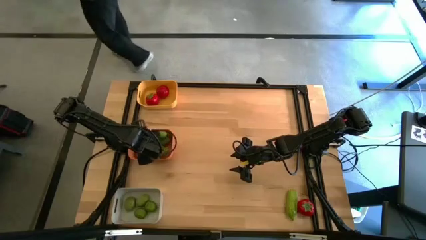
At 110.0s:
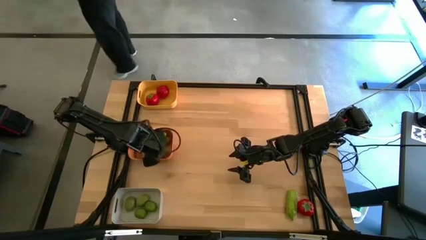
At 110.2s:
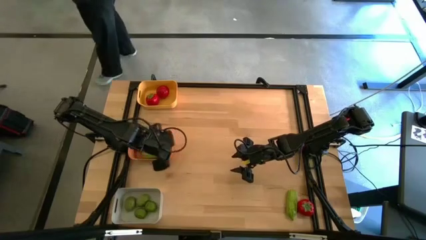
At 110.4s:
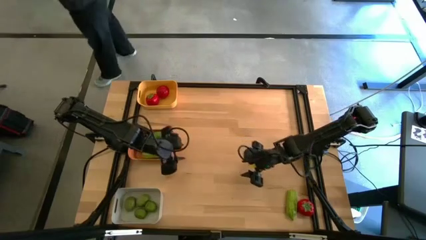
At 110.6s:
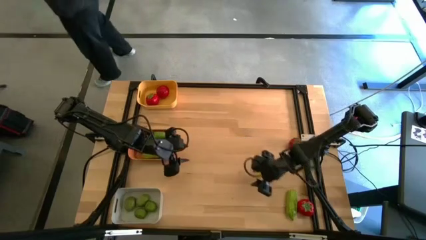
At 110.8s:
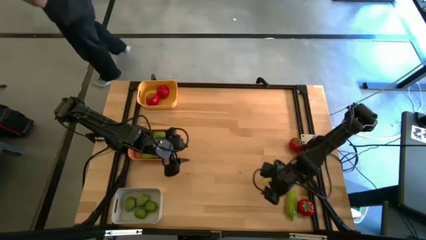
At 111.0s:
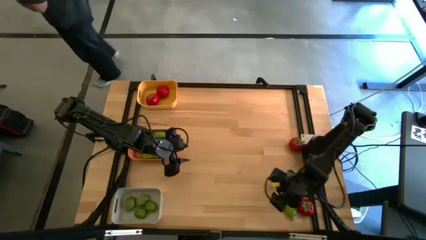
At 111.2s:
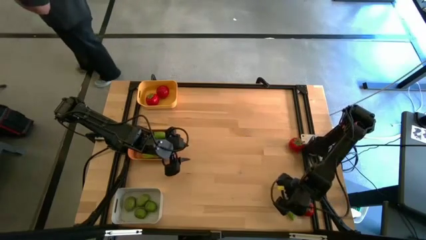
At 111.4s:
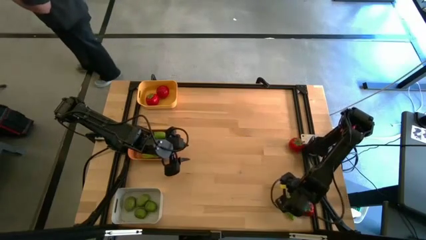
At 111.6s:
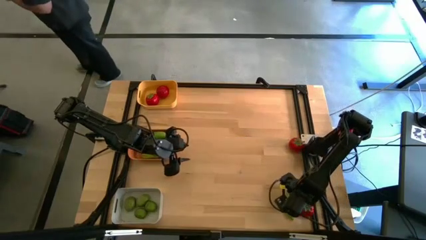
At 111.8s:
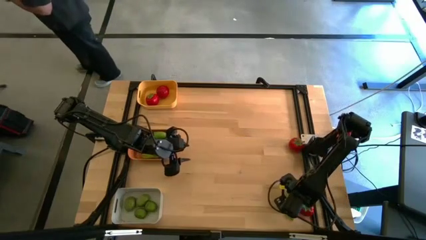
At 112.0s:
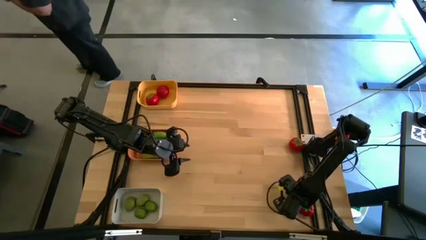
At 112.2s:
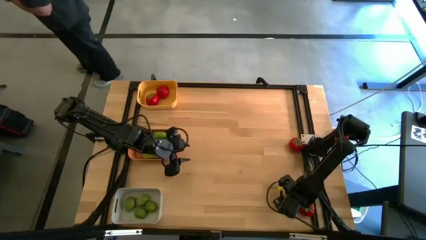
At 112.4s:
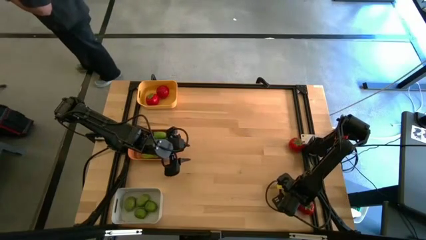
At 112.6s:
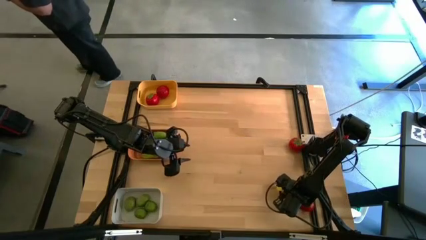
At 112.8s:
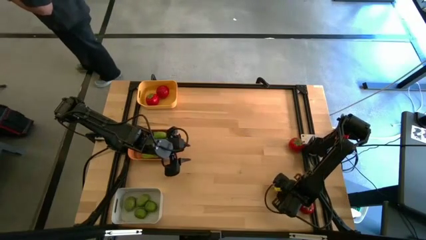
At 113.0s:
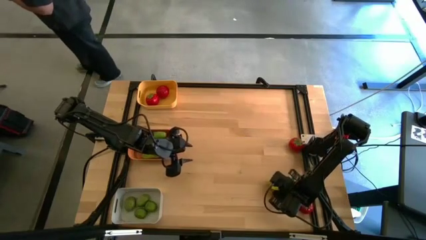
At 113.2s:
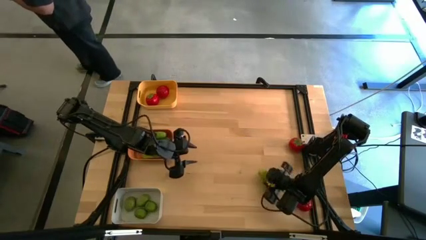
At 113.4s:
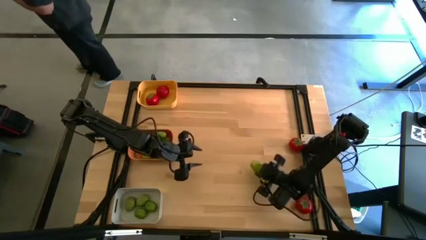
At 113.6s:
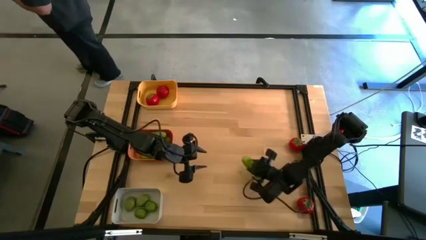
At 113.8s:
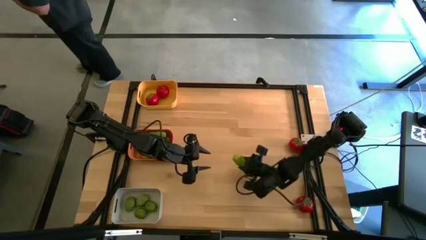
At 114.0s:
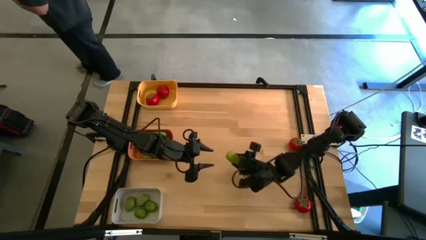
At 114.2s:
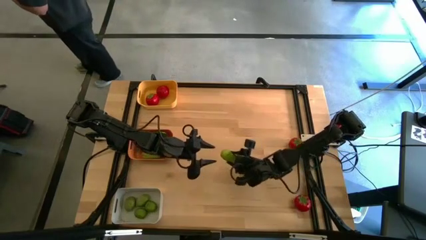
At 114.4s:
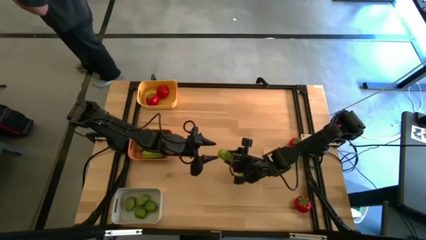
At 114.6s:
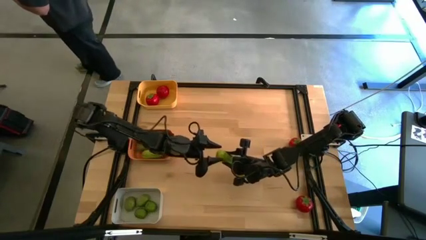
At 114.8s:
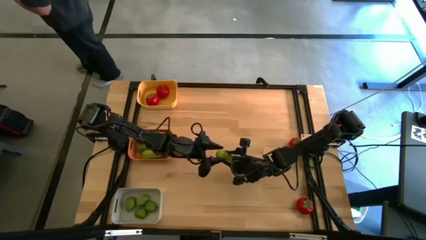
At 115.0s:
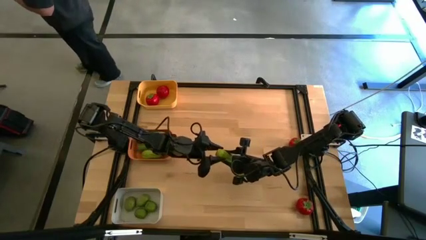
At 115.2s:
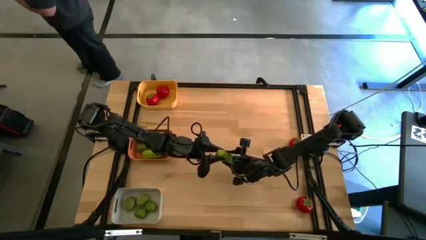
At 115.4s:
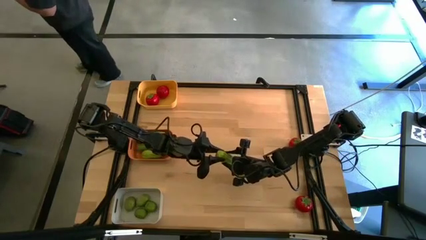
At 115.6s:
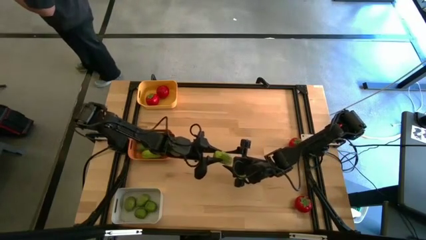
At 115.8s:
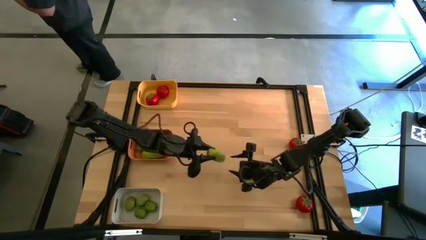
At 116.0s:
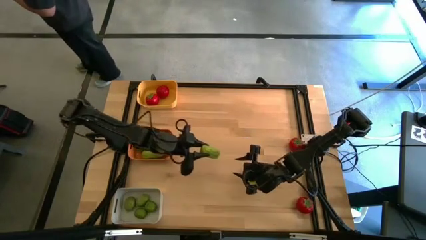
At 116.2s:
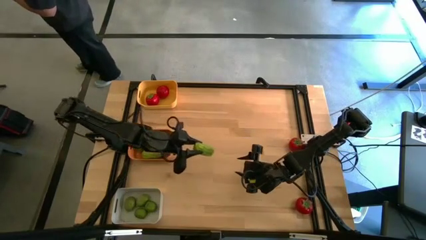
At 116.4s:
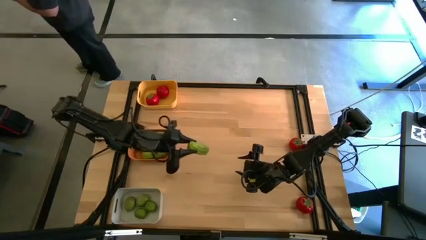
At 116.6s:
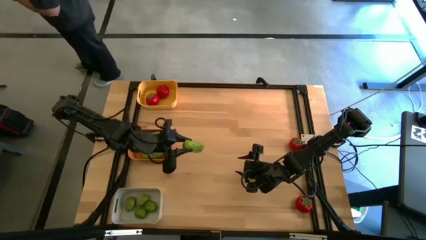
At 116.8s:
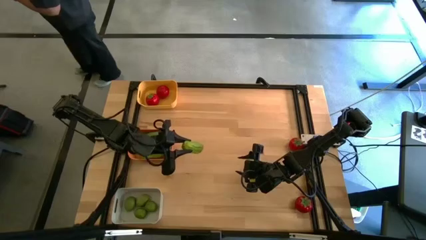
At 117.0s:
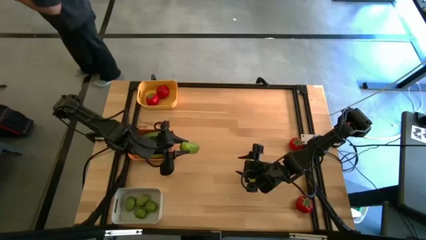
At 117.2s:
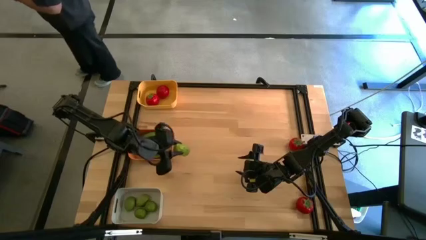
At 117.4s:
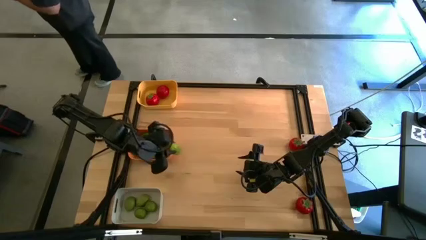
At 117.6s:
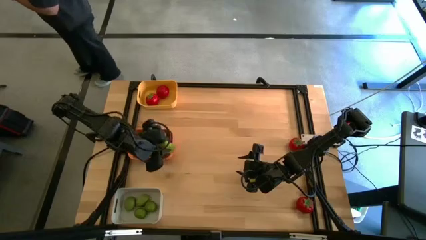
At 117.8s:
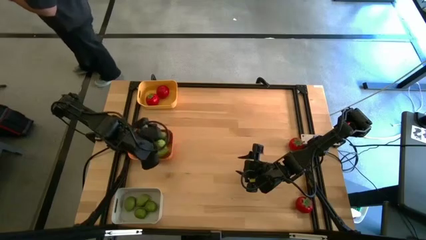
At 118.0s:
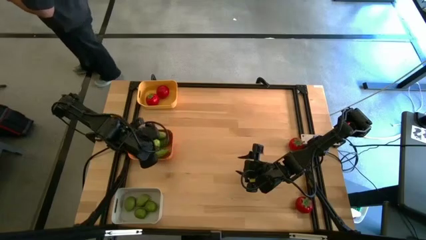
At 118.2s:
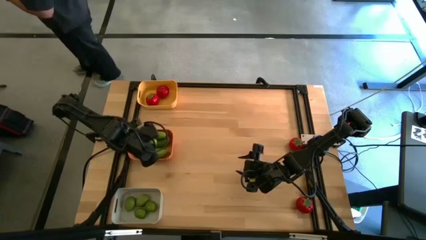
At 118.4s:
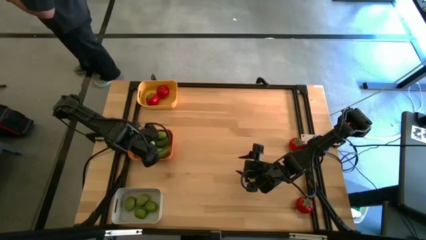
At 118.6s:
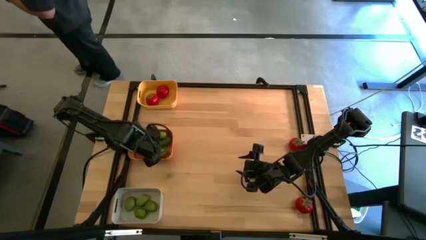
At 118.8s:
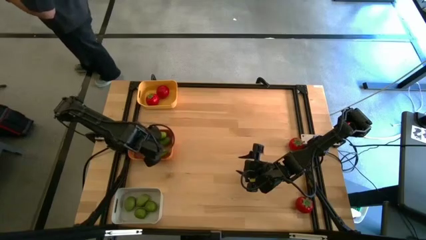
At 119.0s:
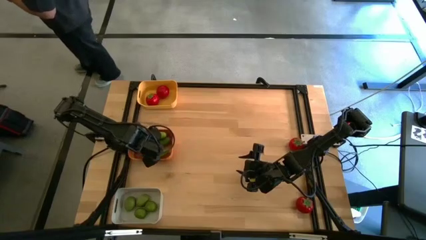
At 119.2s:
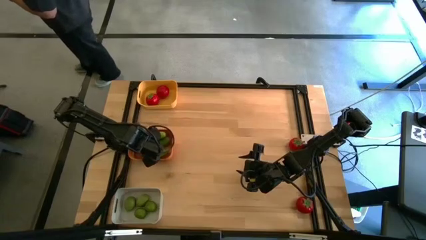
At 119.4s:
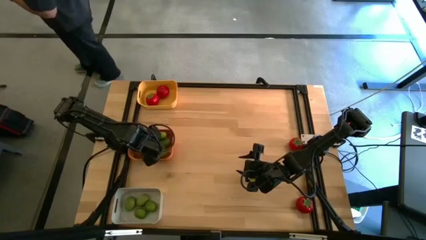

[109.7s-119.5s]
Task: Sort produce into baskets
Put the cucumber into the orange bin

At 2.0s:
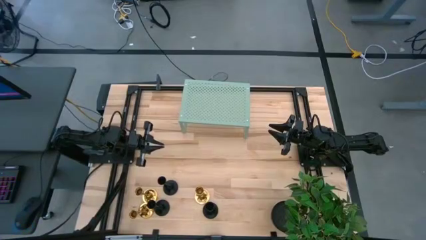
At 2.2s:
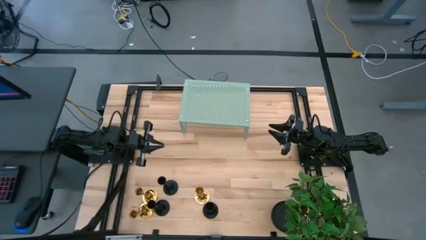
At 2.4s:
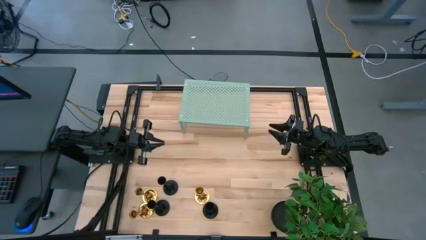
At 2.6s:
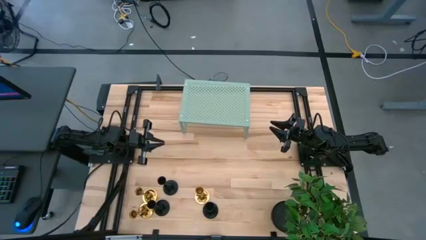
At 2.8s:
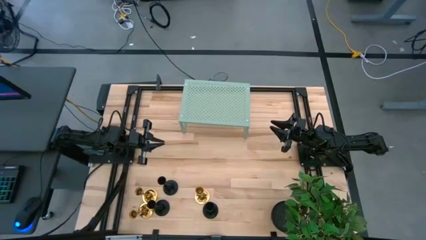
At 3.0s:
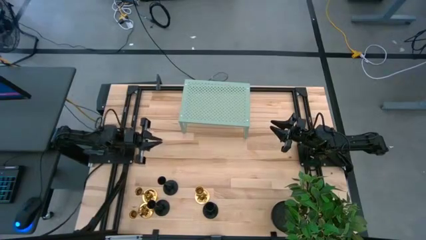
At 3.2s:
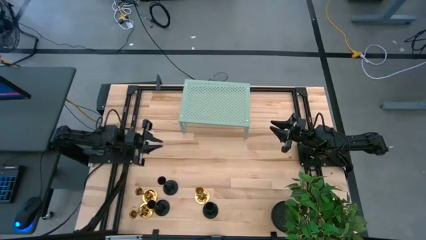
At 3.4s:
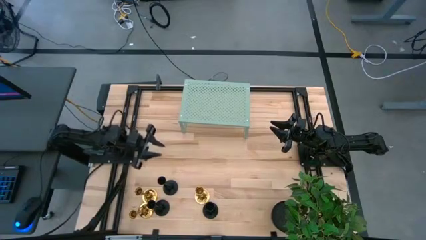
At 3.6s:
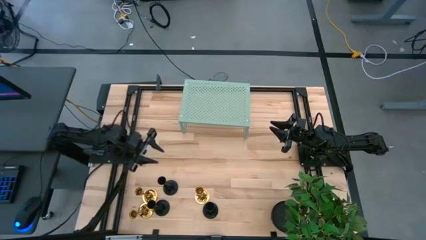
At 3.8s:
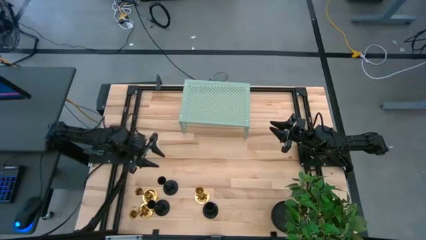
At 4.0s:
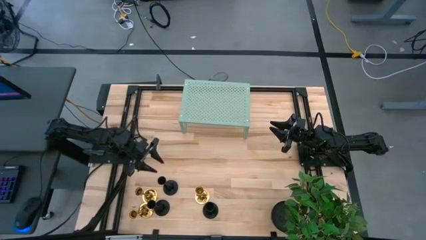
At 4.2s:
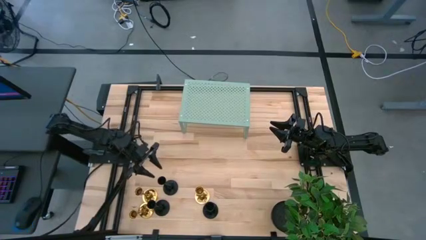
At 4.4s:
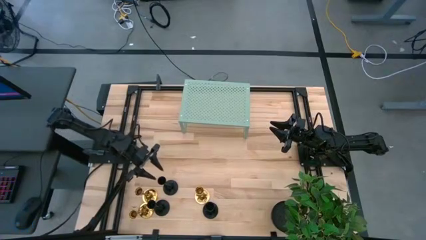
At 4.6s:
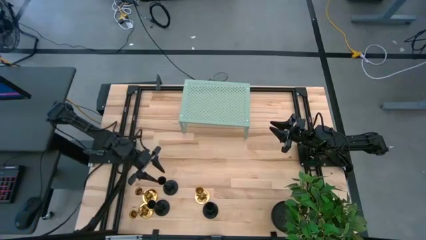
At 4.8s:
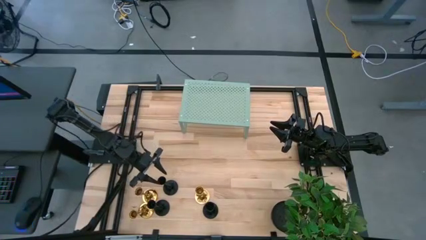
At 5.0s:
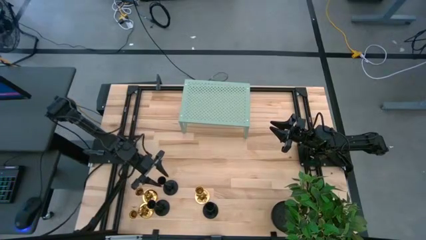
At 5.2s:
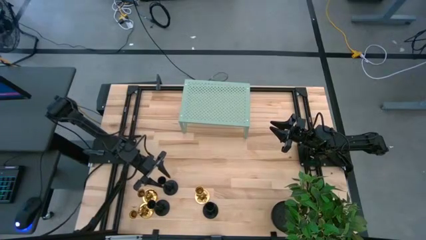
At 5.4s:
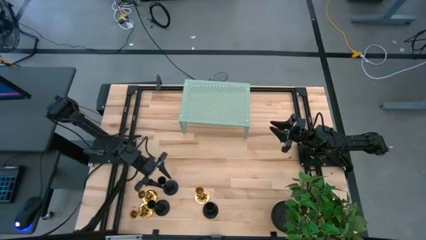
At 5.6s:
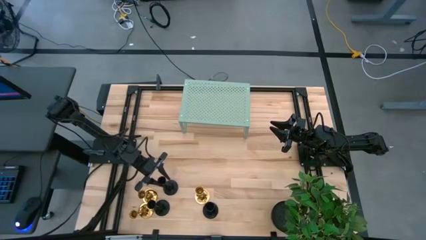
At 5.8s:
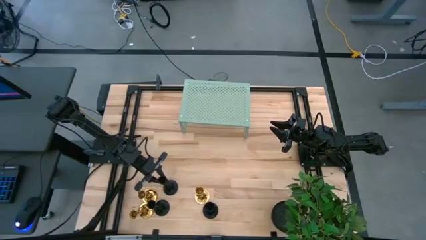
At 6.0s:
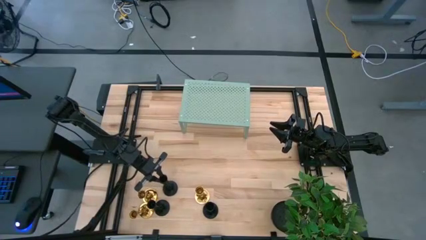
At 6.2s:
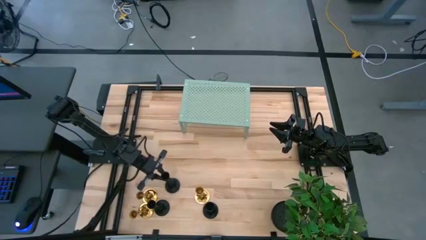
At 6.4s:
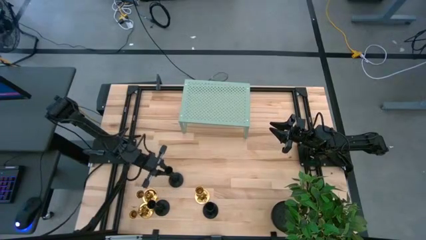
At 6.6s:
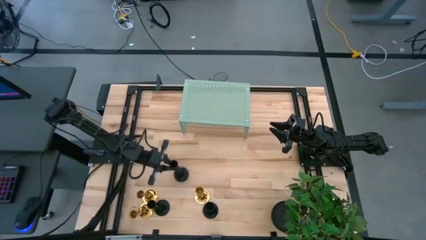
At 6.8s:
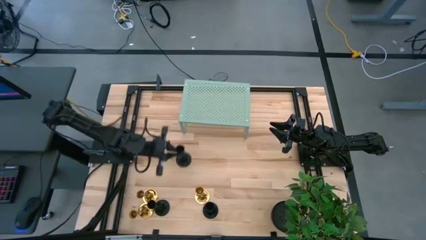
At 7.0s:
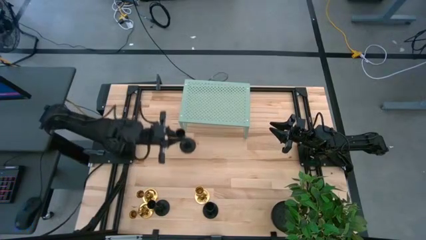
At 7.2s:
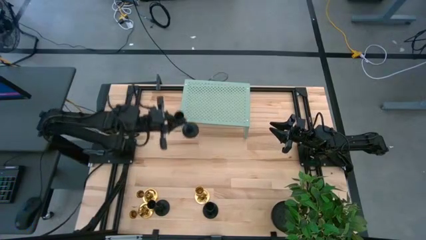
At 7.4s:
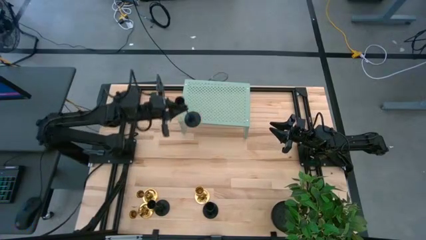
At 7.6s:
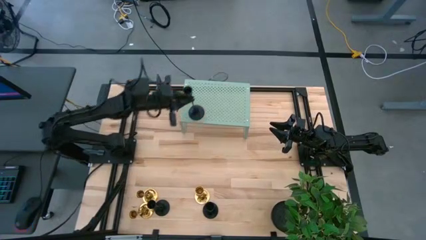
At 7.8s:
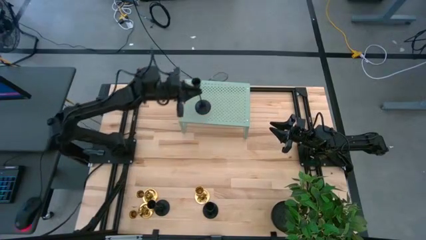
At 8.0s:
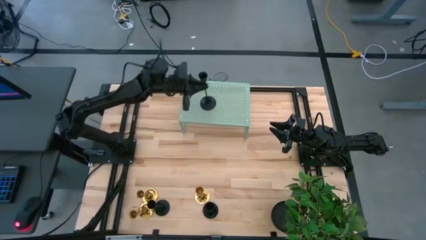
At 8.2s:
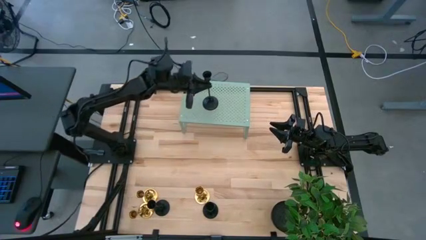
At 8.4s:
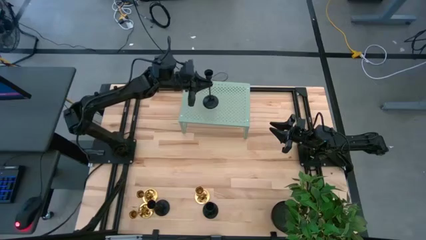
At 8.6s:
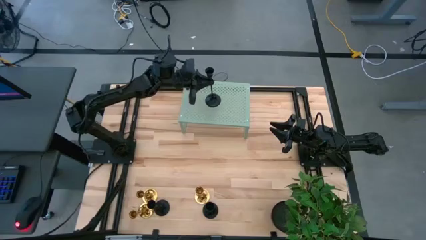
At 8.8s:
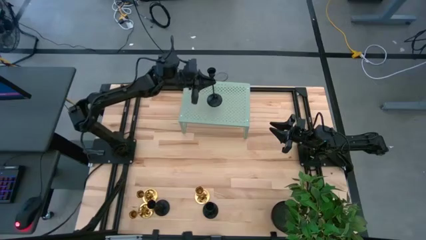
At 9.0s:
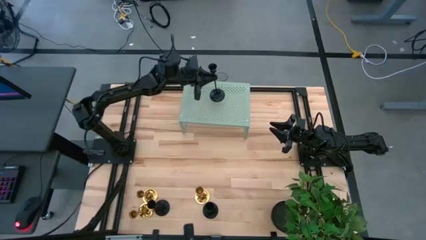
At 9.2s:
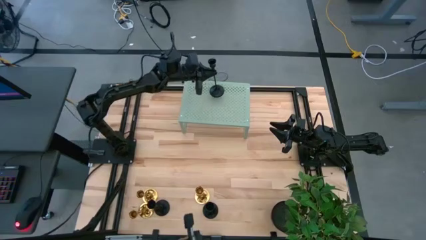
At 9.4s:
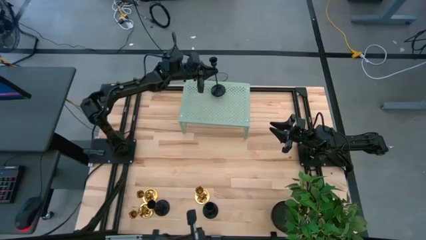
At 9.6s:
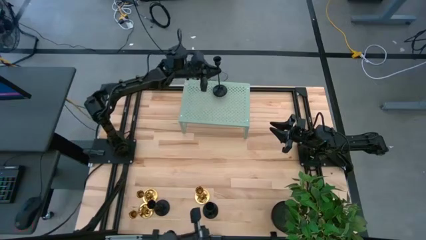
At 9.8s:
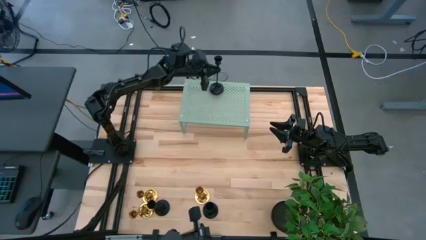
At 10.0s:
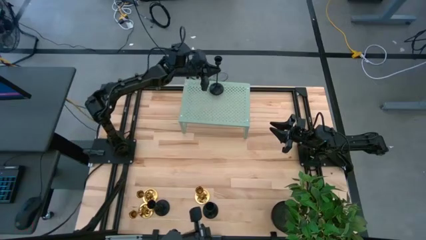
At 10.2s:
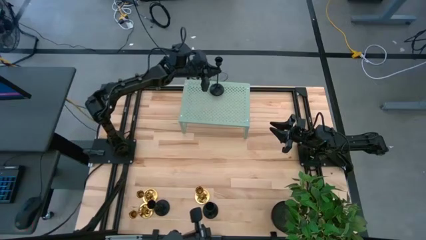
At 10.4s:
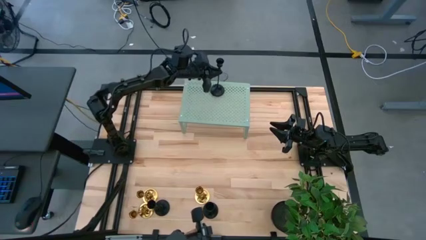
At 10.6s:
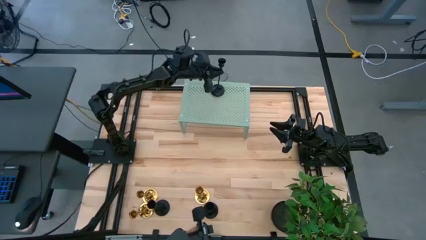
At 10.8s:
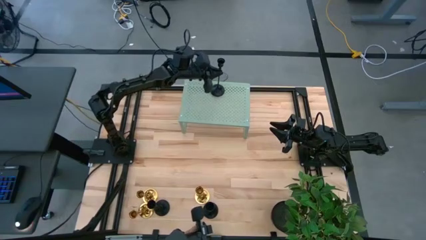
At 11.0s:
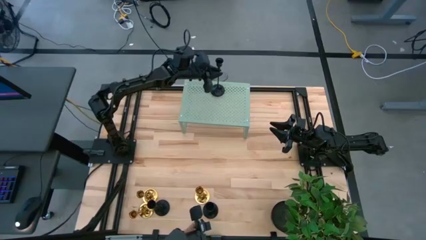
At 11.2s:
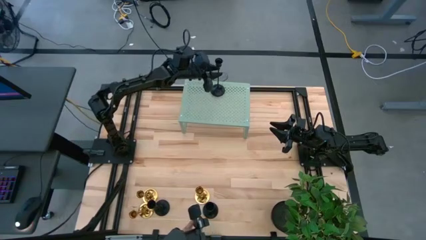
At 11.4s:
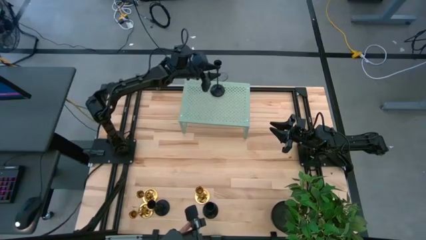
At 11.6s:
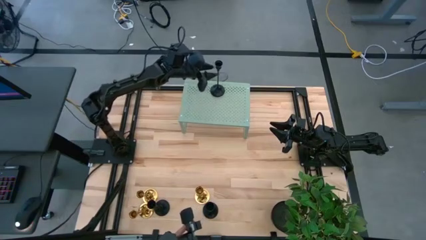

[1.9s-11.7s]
Task: Pick & Place candle stick holders
Put the top left black candle holder on the shelf
